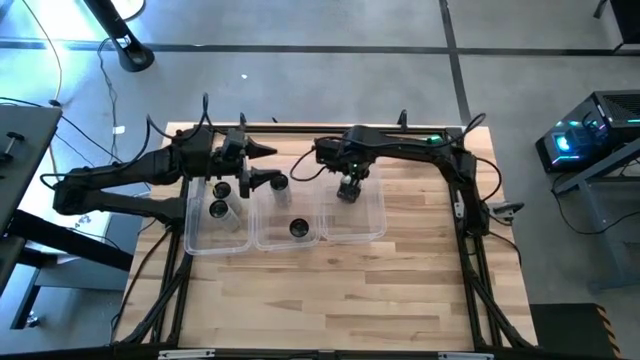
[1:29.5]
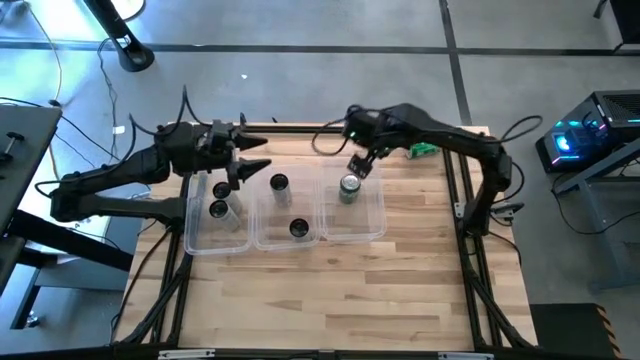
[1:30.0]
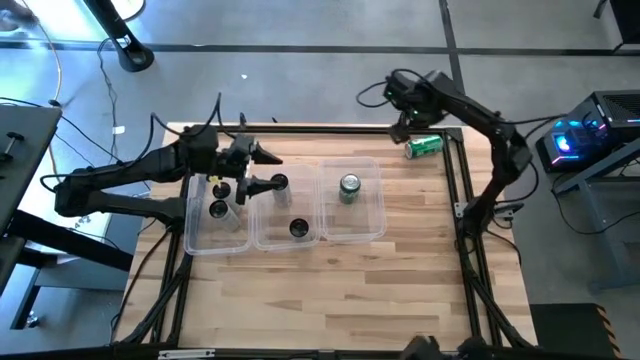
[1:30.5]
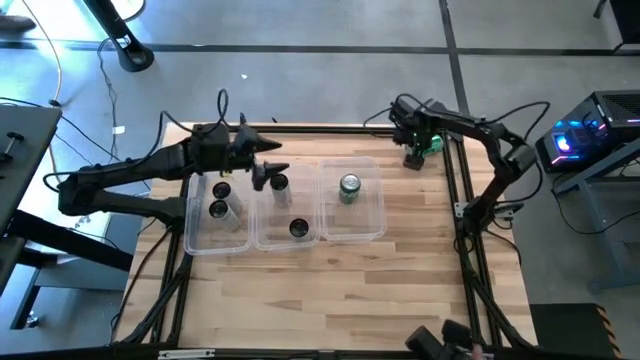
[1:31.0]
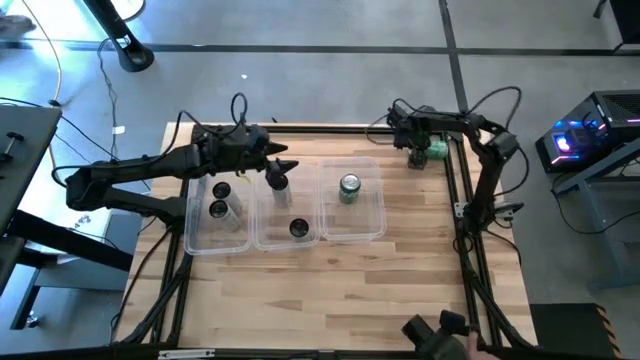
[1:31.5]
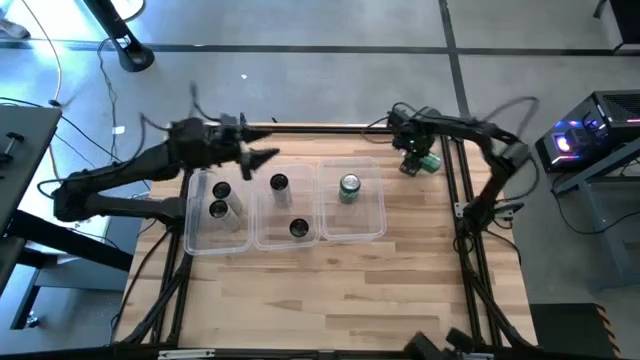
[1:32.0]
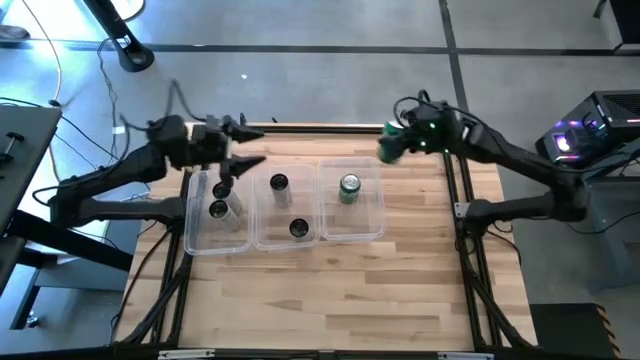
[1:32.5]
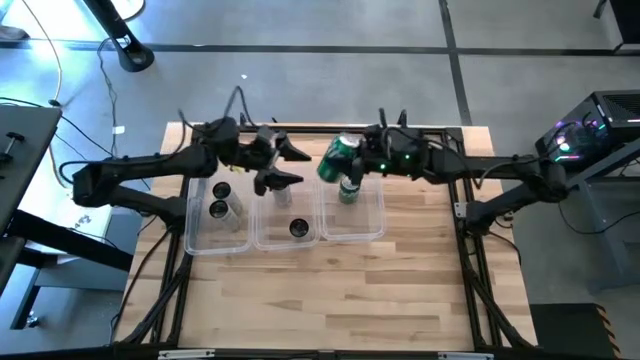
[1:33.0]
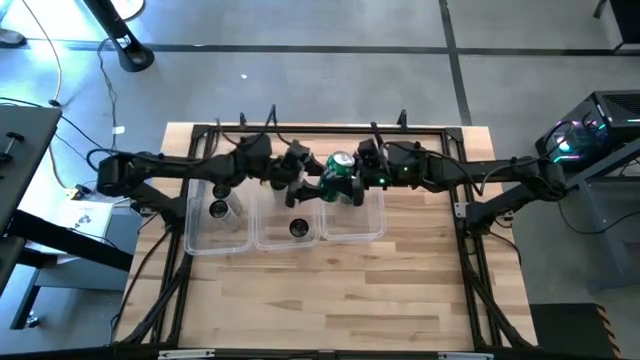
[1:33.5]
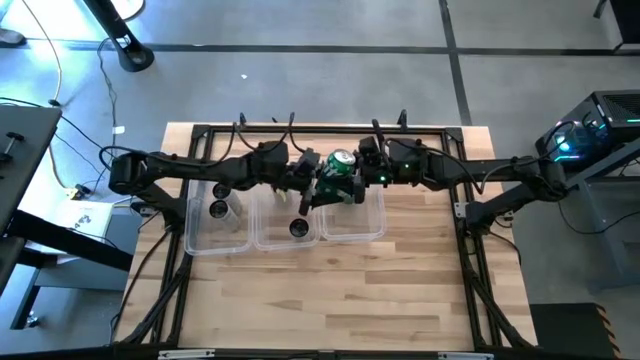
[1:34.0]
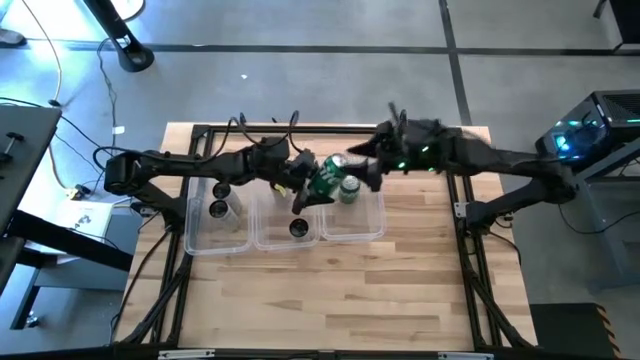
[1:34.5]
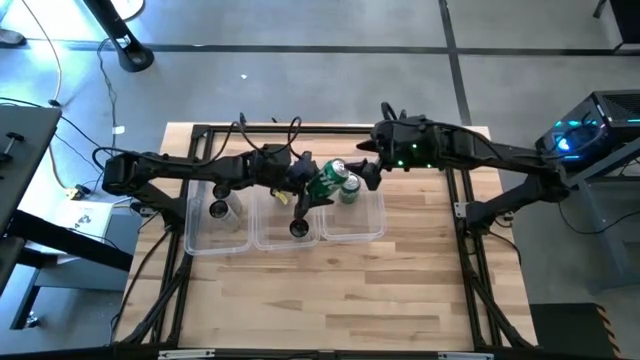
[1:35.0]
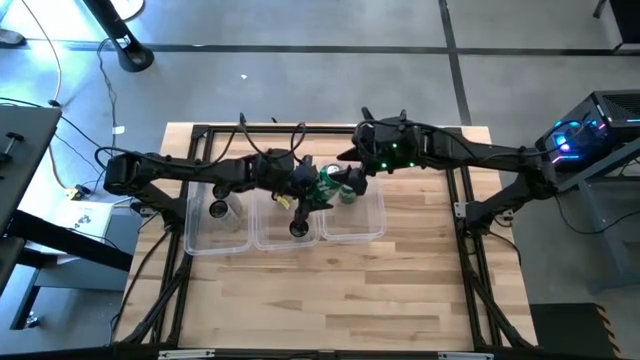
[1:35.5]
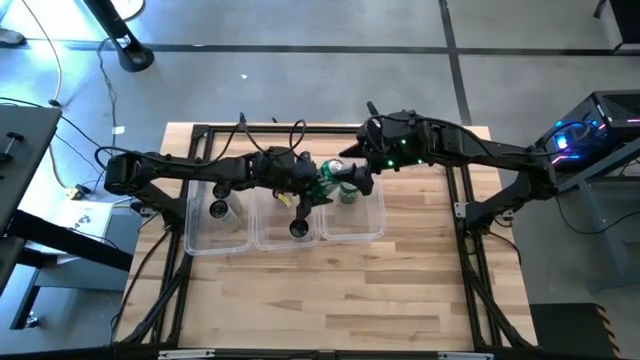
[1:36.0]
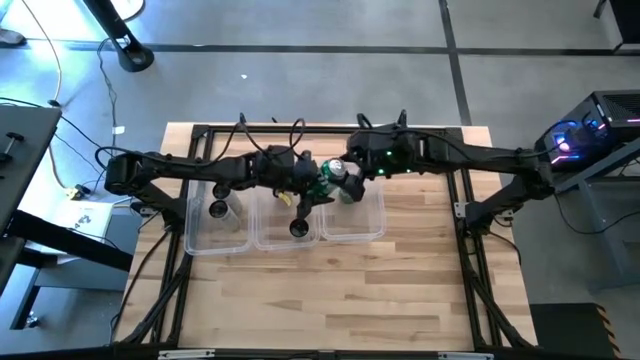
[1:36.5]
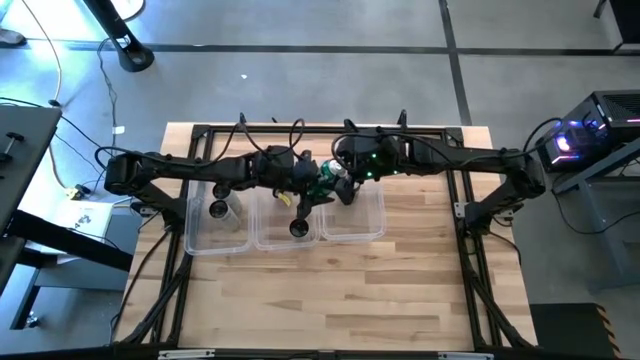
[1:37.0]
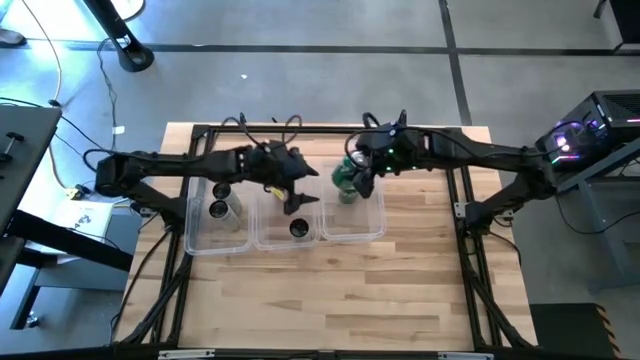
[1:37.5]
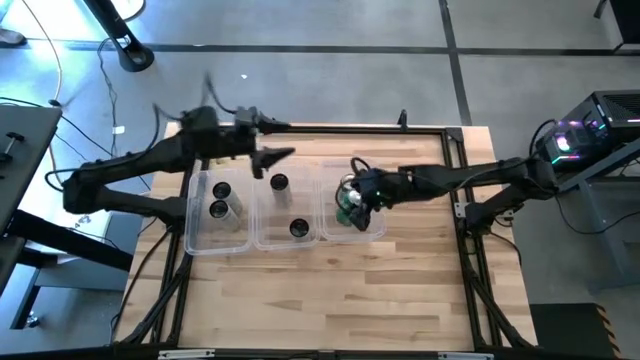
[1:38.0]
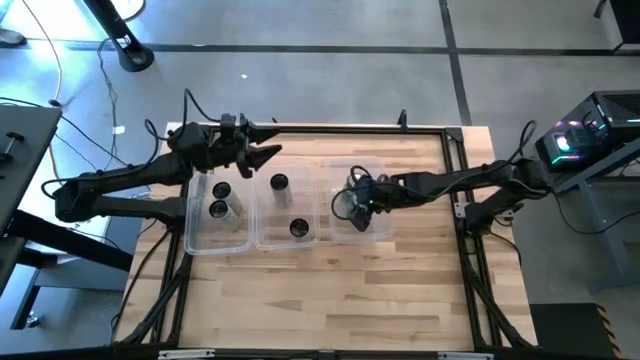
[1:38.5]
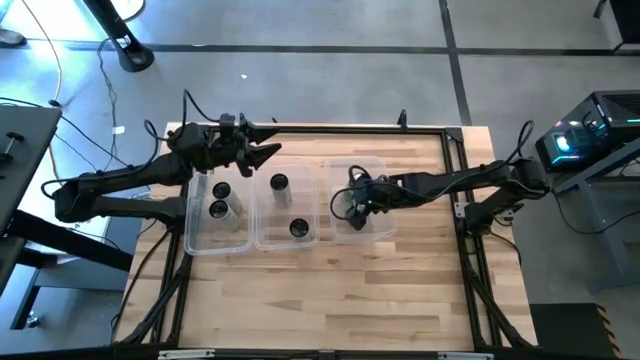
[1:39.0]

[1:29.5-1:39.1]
Task: Sort soda cans
Put the green soda can into the right transparent container

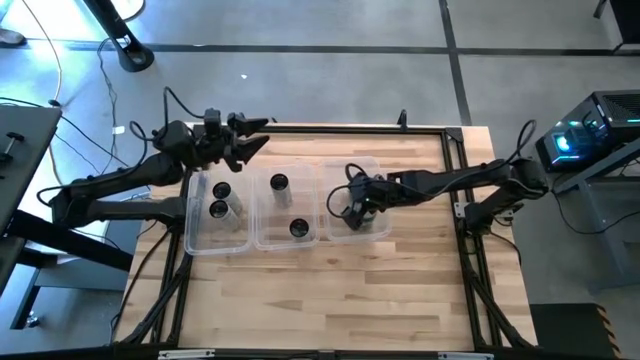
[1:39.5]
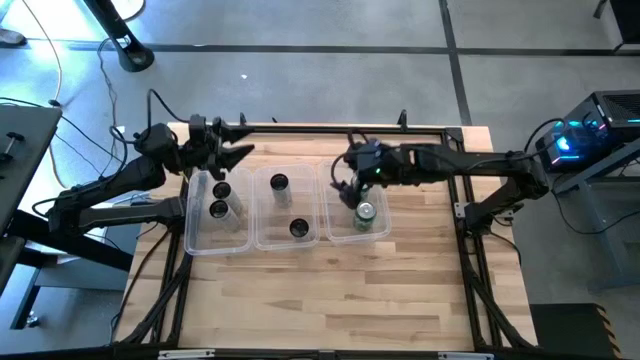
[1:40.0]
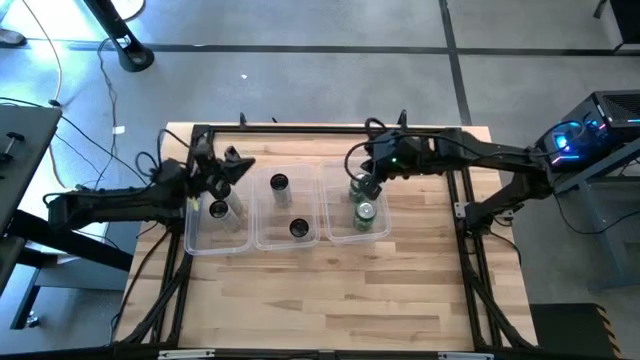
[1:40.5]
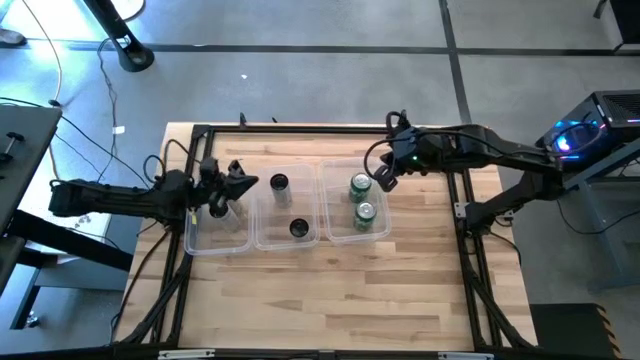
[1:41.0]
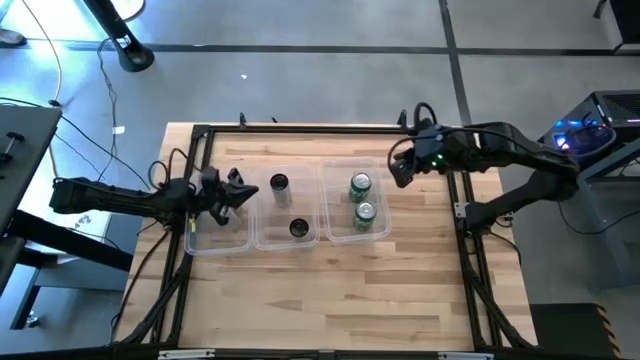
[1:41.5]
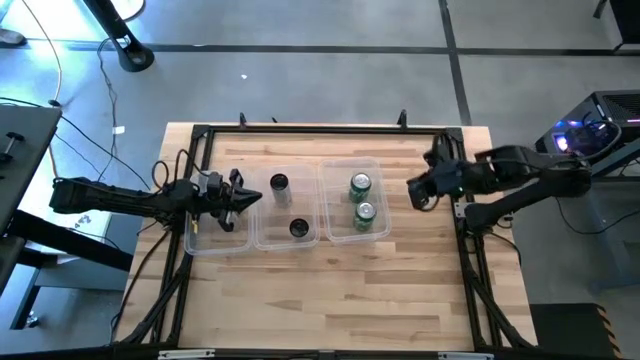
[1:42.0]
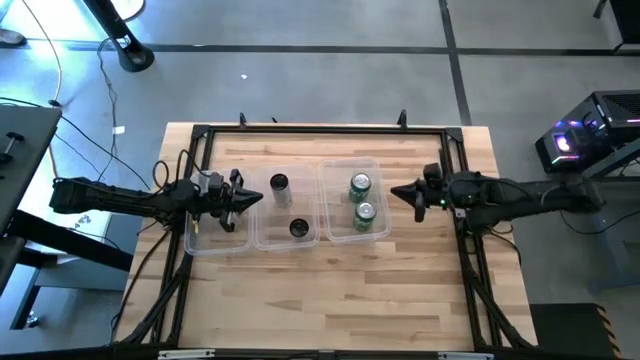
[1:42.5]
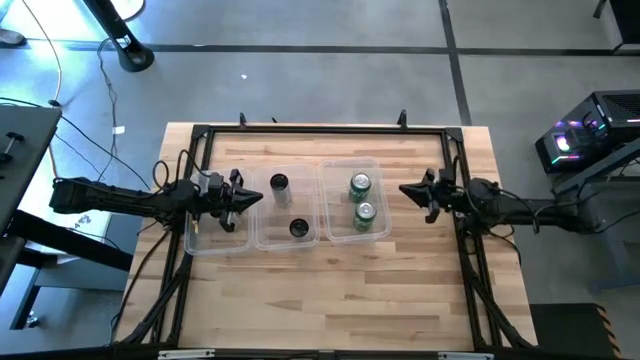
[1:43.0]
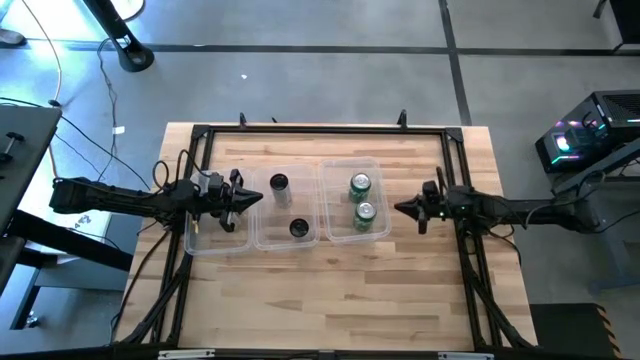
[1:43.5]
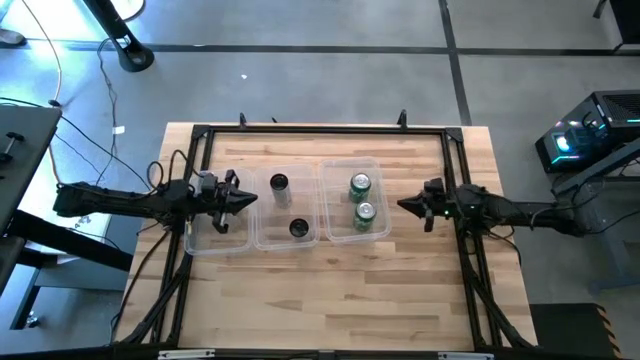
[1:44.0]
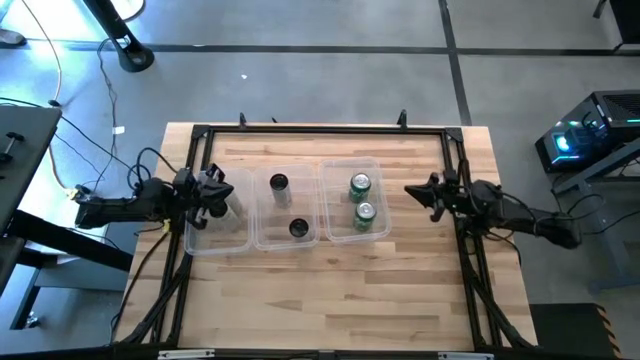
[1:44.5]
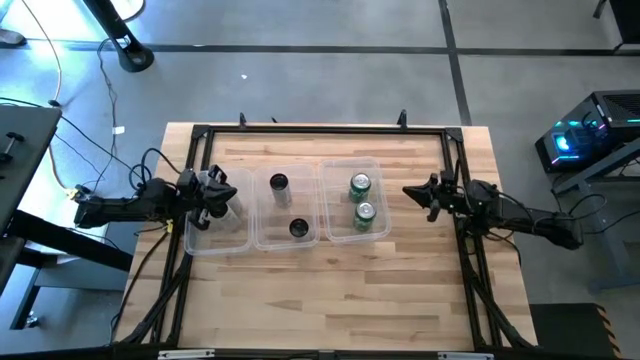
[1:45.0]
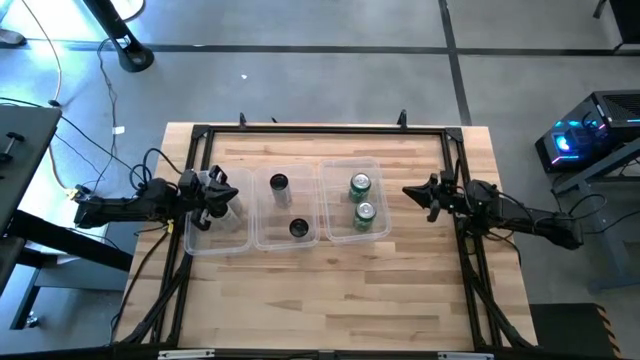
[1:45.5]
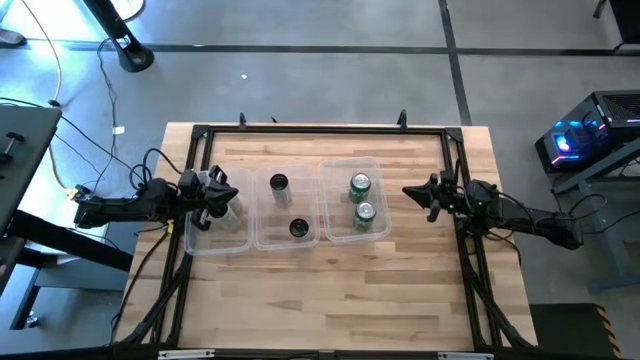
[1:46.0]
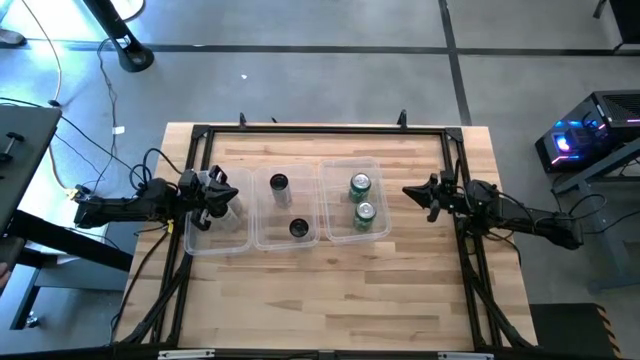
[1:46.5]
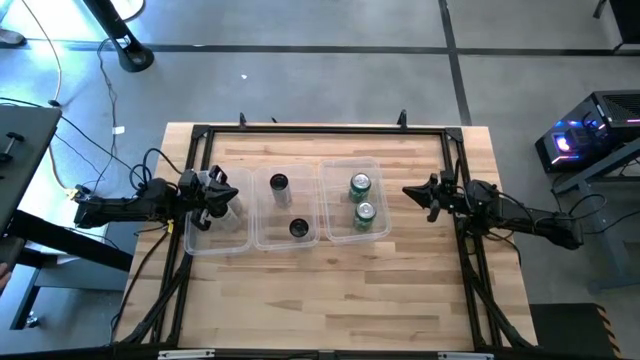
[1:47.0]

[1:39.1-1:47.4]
Return to Home Position

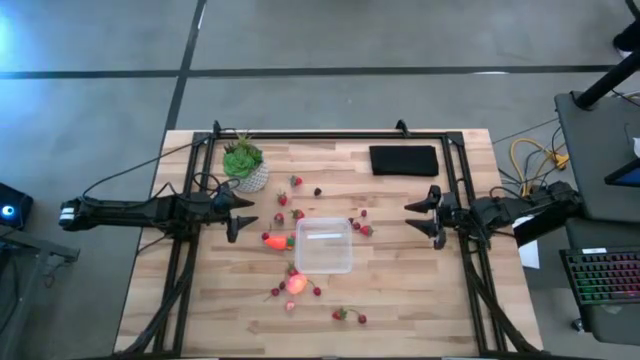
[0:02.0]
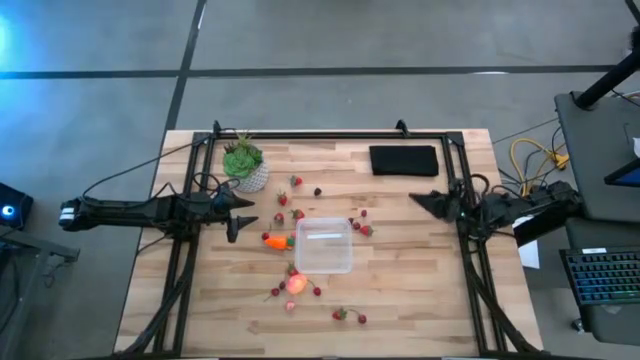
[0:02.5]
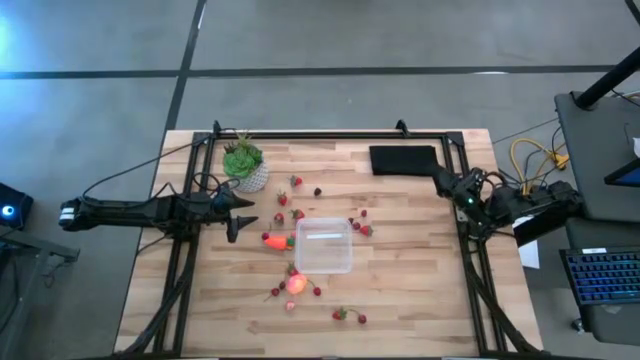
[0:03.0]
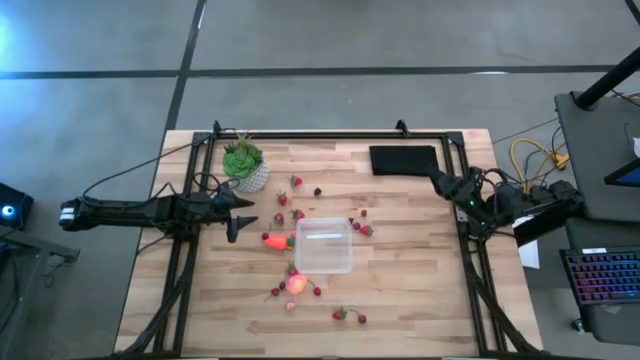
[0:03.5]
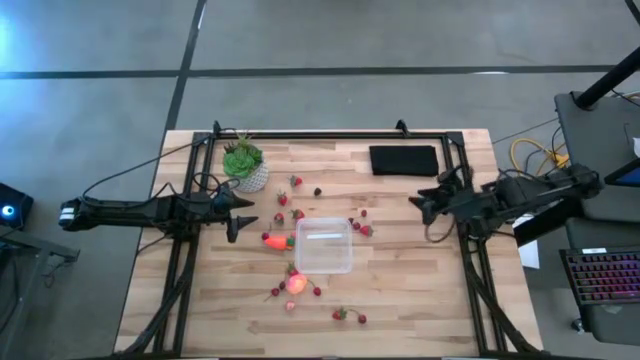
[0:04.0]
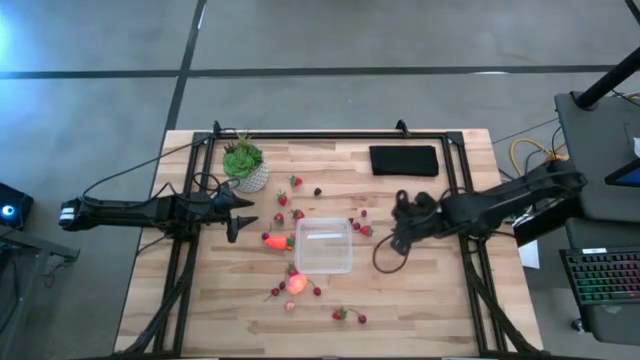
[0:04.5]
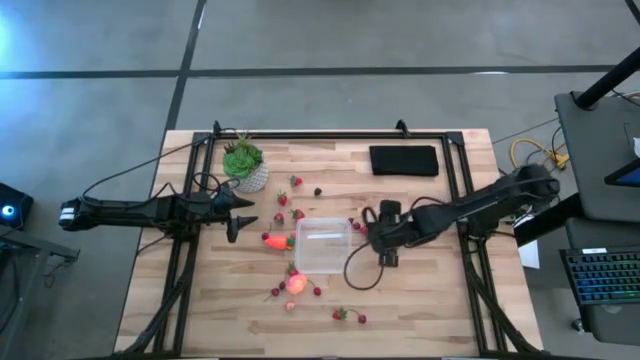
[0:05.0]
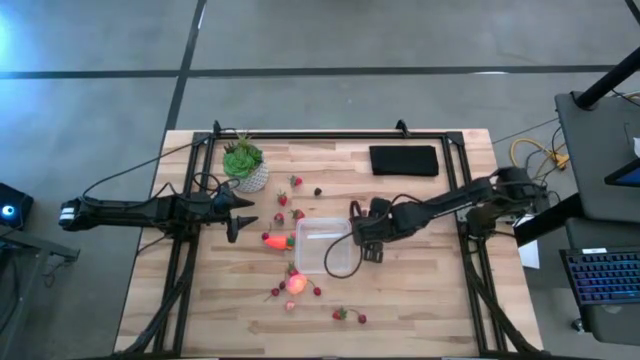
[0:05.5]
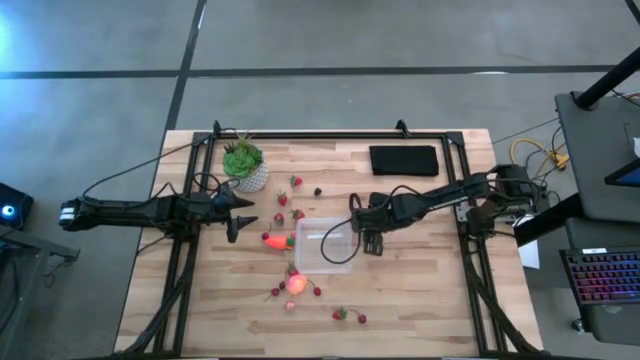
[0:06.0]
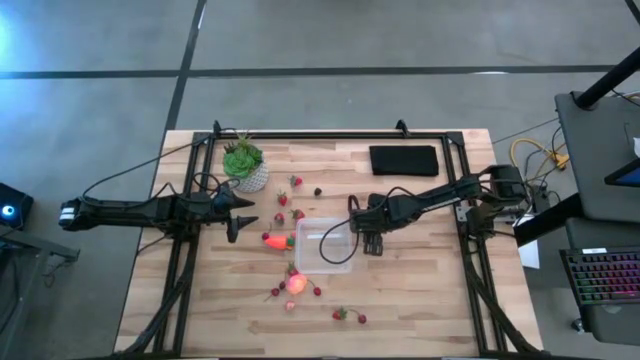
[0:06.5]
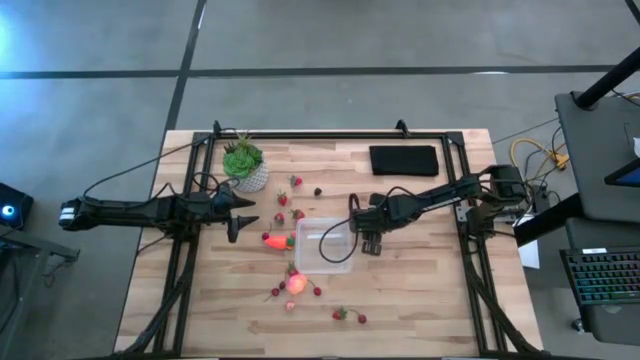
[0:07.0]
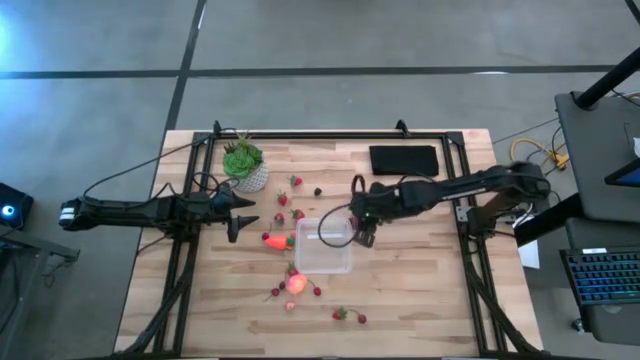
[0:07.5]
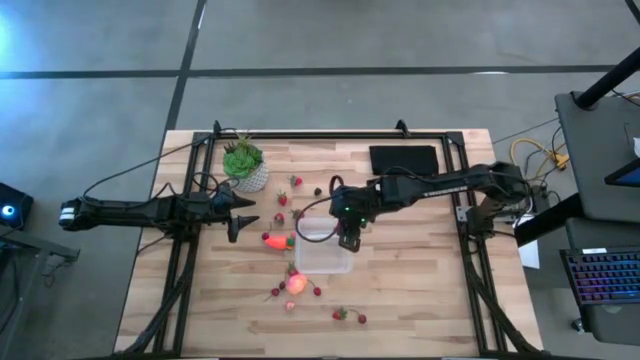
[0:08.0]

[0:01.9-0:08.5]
Task: Pick and placing Produce into tupperware
Put the strawberry into the transparent container
